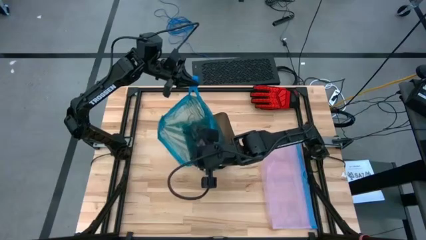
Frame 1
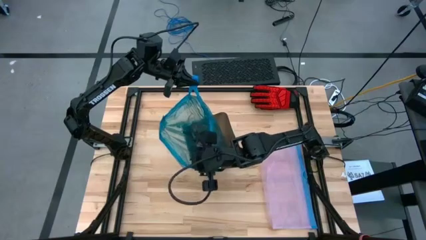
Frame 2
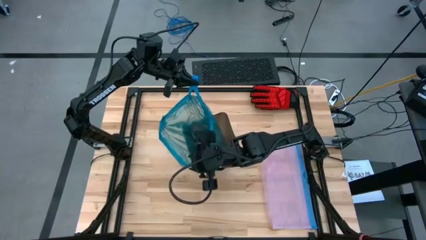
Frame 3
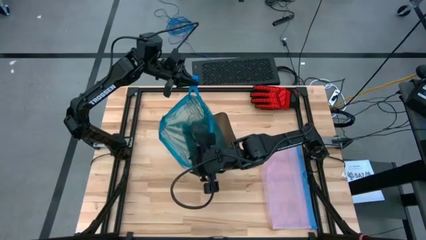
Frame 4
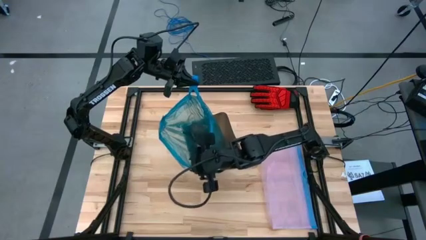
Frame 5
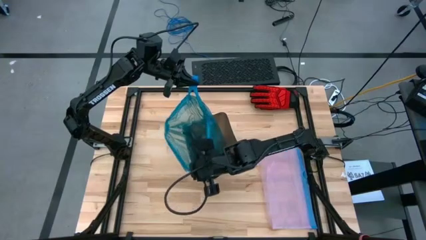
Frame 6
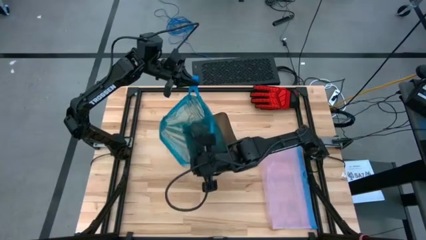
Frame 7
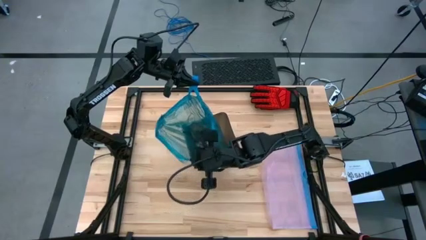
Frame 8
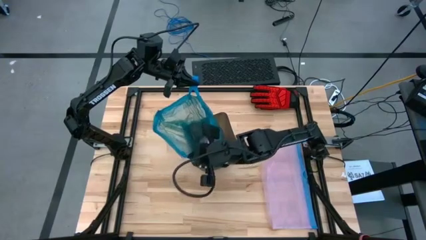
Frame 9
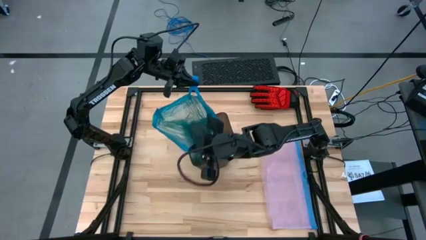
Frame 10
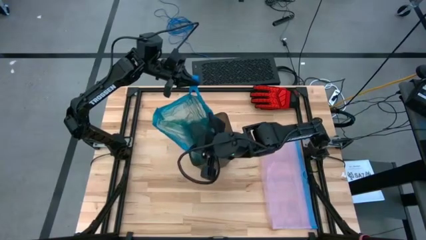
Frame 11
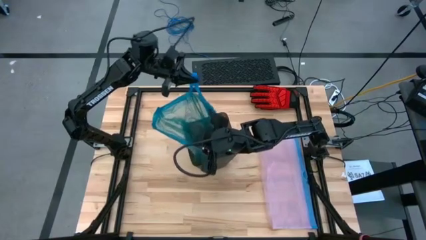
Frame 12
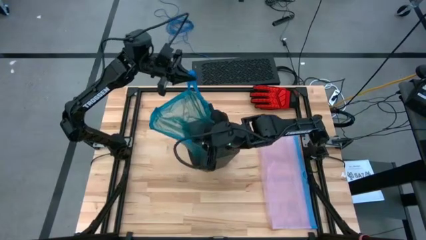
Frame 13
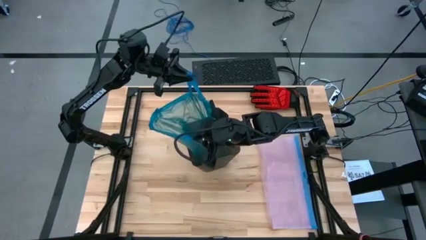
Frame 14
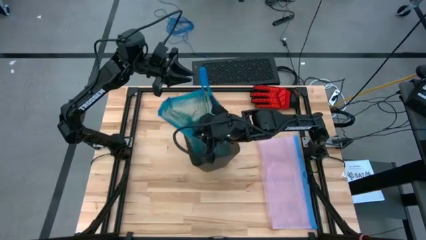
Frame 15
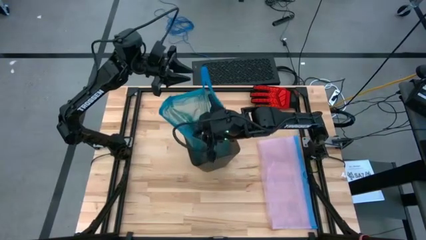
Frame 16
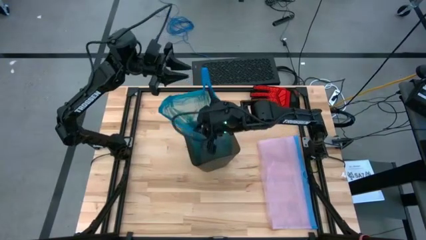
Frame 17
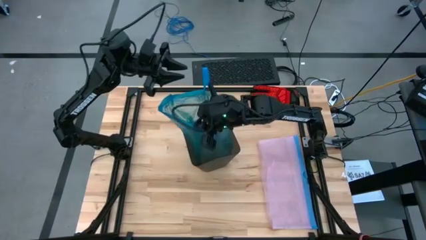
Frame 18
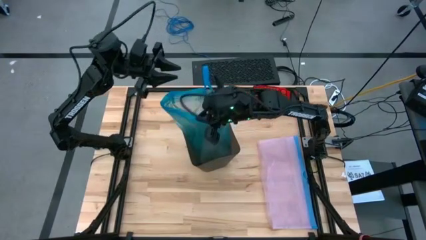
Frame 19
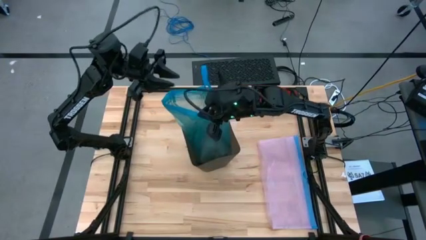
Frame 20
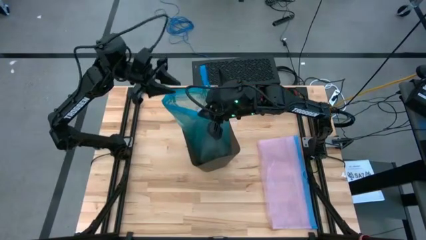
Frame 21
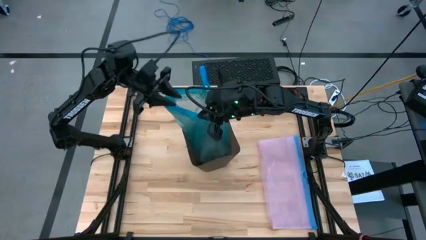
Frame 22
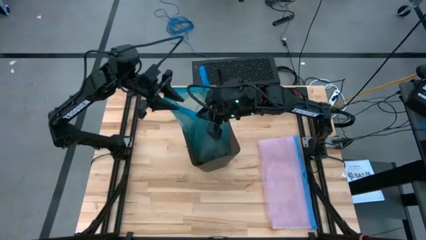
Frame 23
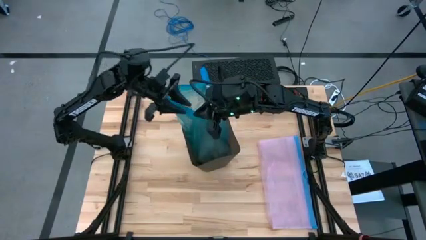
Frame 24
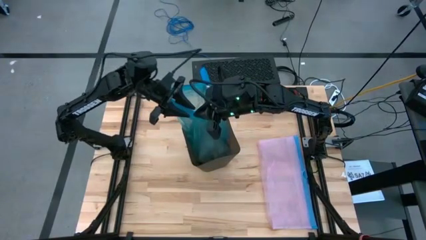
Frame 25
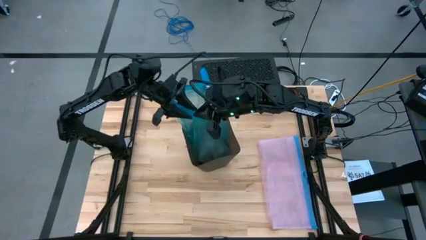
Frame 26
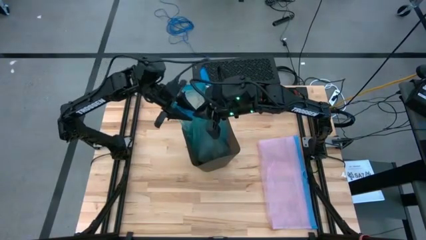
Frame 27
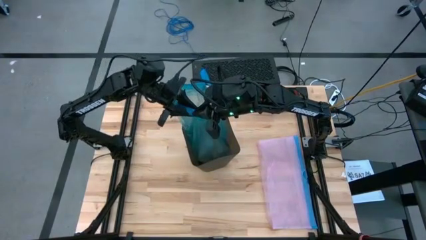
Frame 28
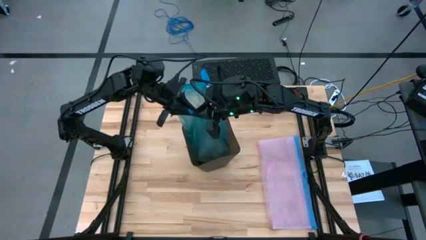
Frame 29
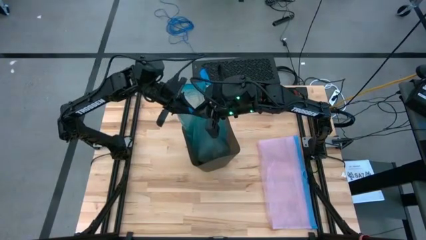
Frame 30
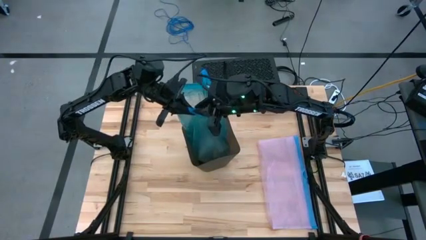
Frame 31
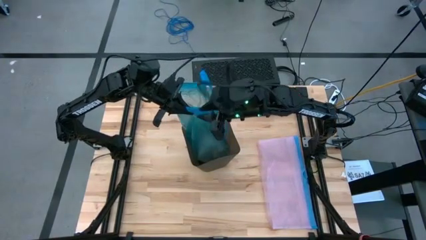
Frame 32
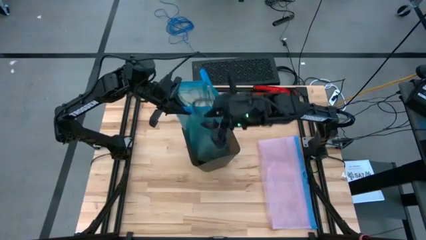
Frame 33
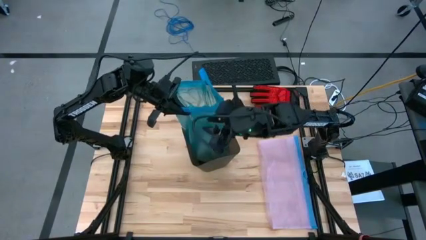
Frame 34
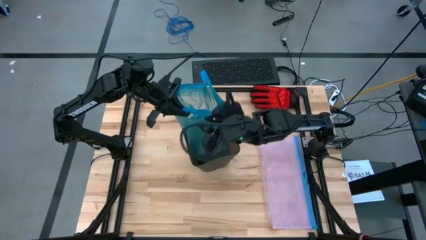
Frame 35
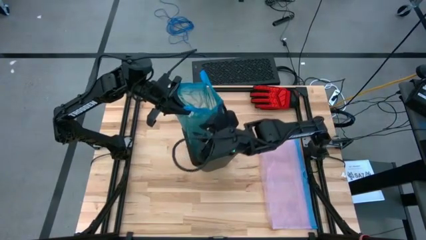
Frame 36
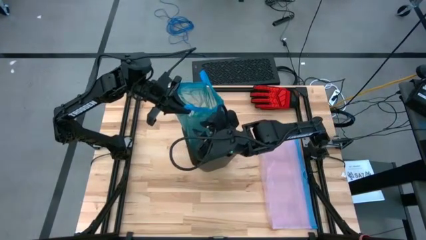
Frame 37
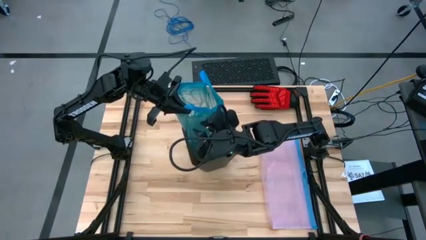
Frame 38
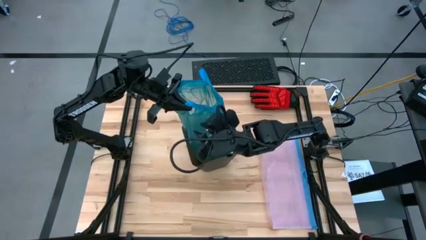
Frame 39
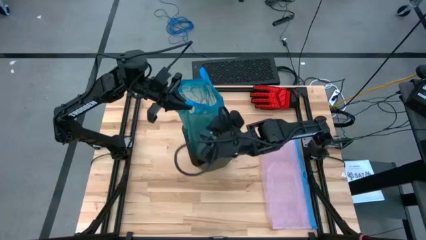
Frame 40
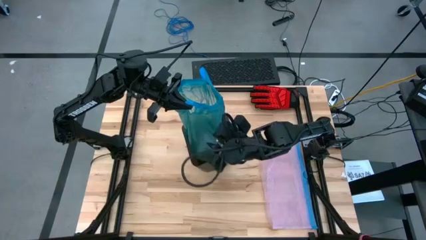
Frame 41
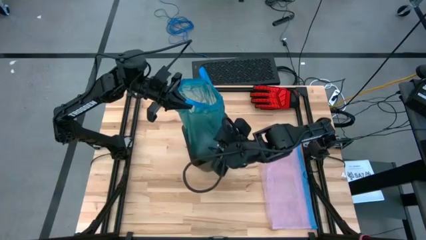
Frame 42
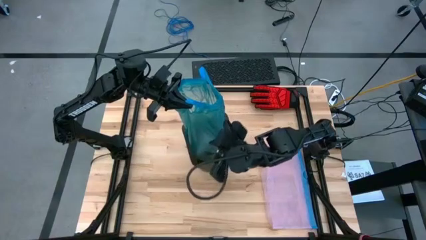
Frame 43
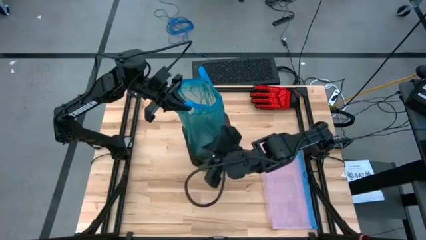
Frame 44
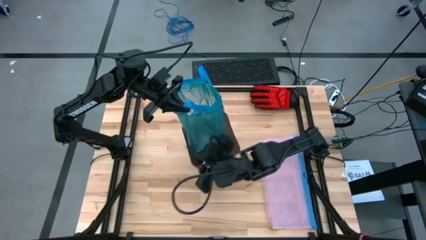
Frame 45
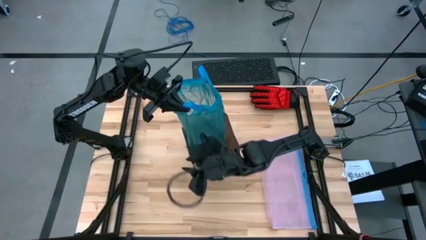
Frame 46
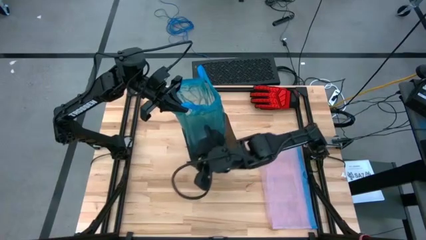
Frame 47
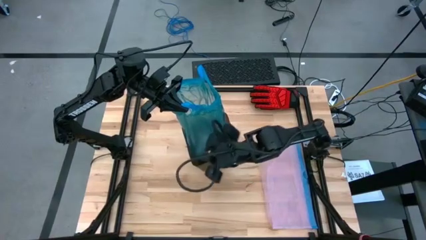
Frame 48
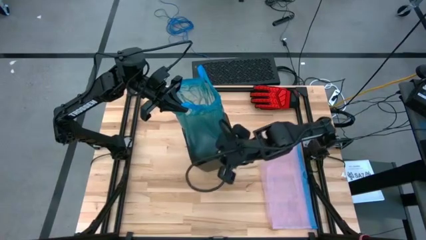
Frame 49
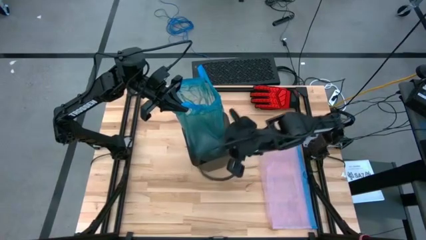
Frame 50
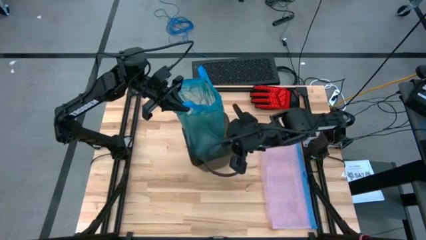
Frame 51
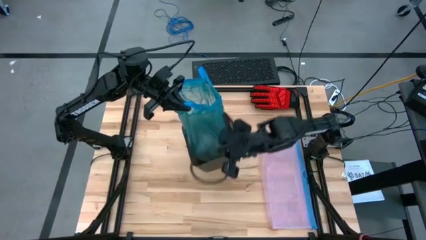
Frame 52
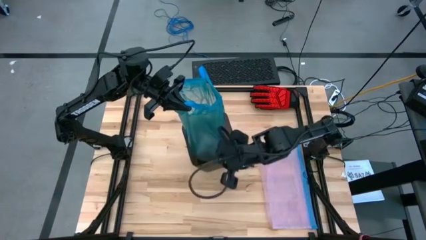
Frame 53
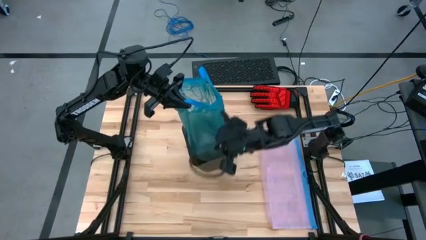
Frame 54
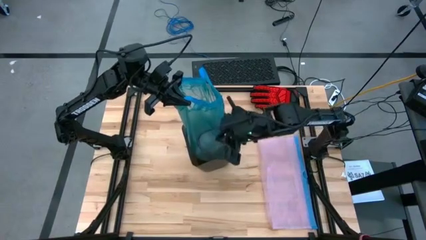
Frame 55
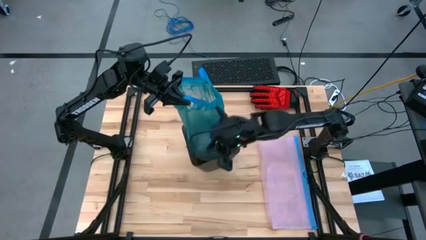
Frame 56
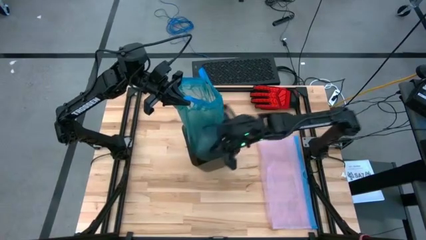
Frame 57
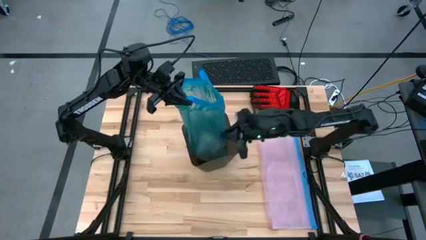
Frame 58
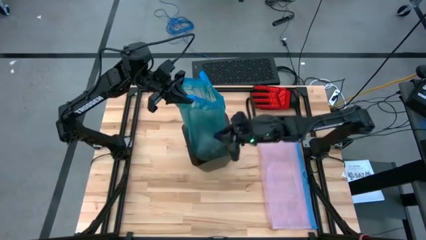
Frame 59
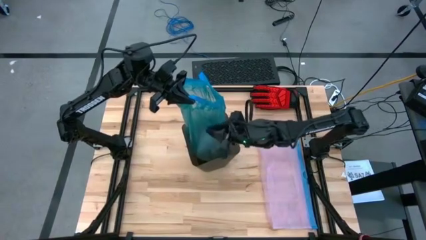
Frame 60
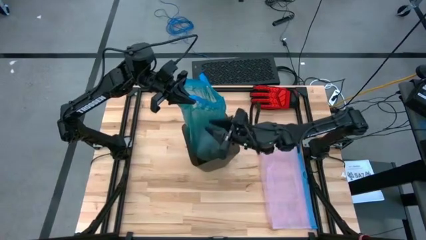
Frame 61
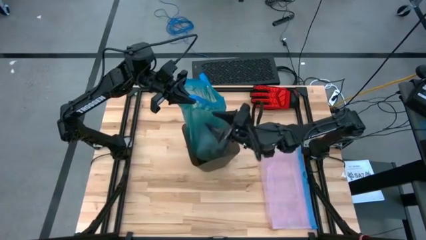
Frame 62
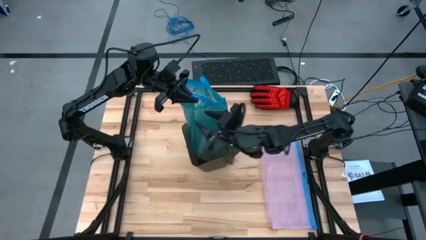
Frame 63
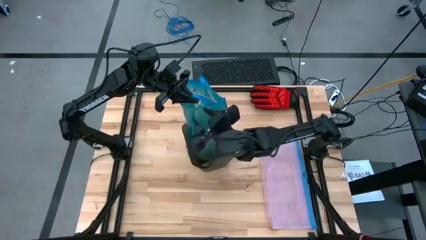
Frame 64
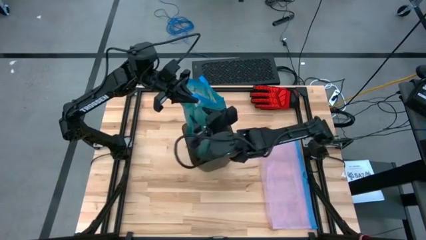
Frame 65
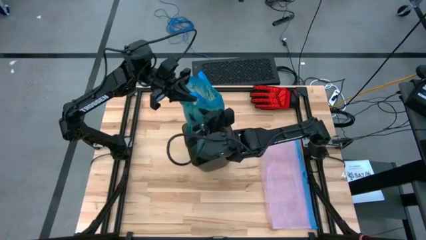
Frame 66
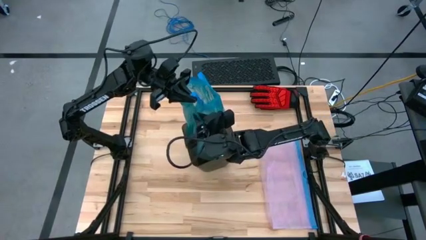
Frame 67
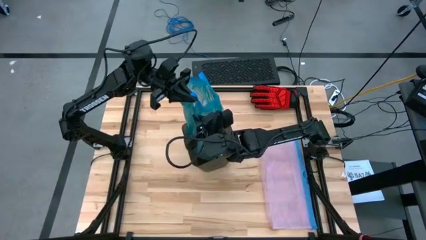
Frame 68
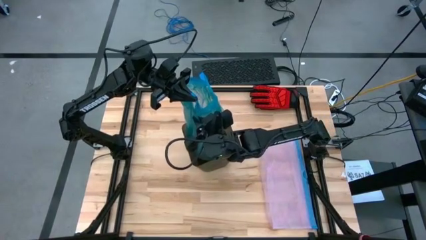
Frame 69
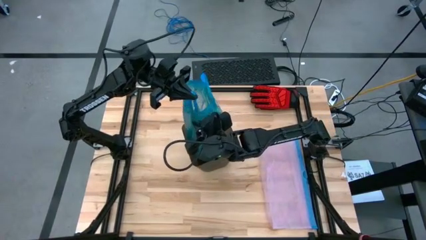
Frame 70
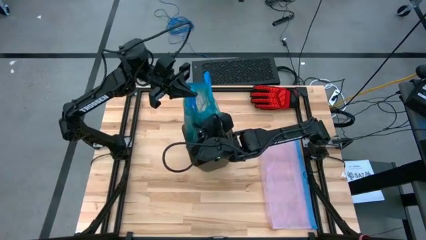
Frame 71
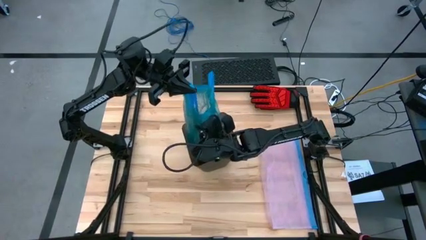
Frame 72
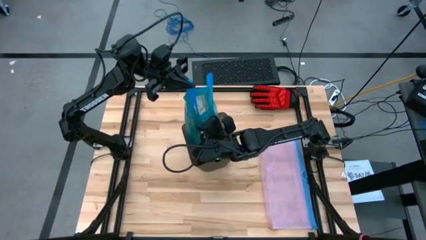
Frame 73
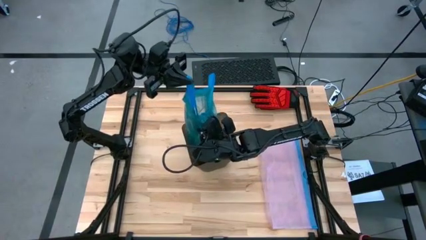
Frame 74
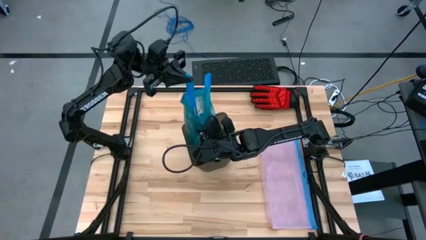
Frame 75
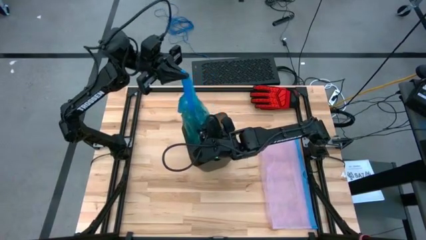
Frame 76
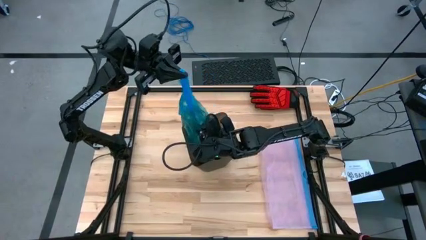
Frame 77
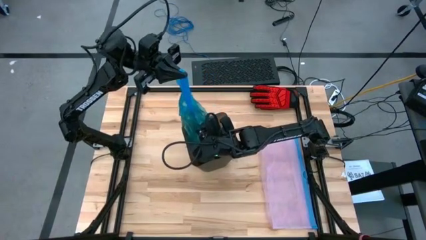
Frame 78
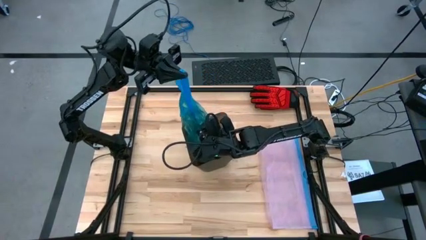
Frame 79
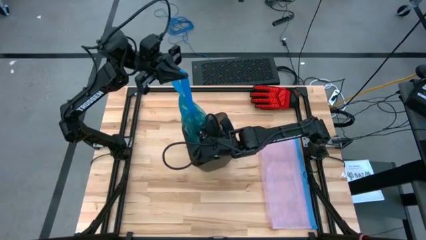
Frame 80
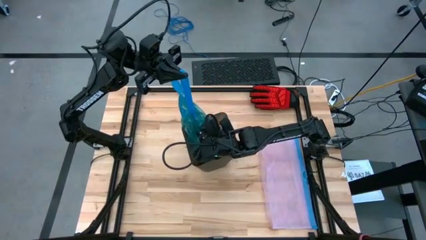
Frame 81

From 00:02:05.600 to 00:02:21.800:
Task: place trash/remove bag and relplace
Remove the blue trash bag from the black trash bin
